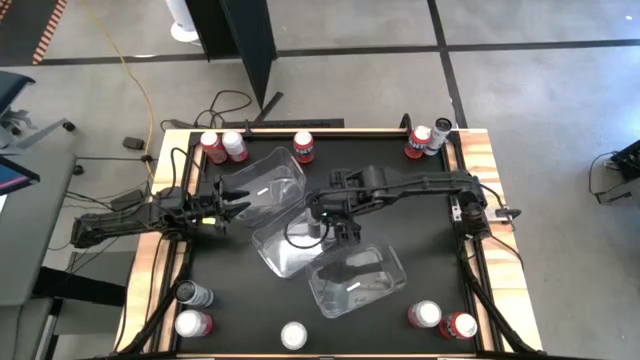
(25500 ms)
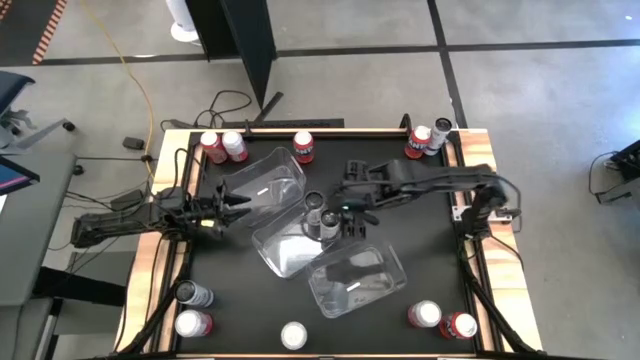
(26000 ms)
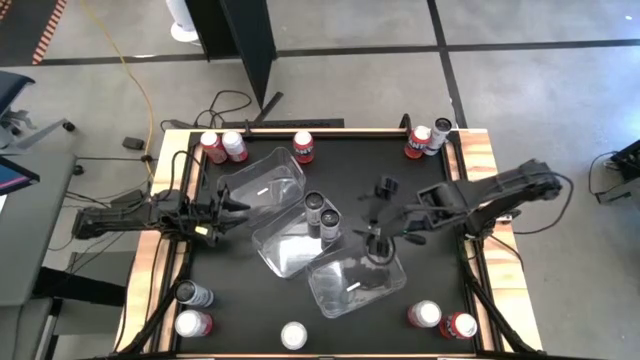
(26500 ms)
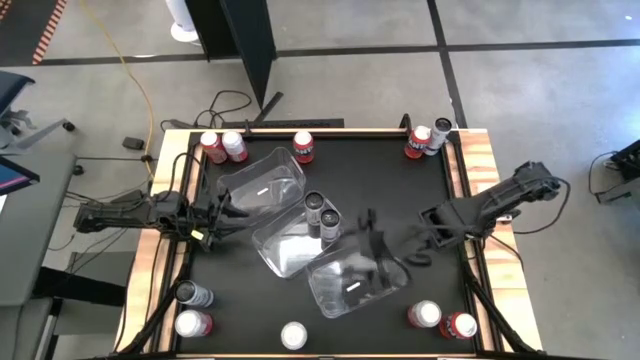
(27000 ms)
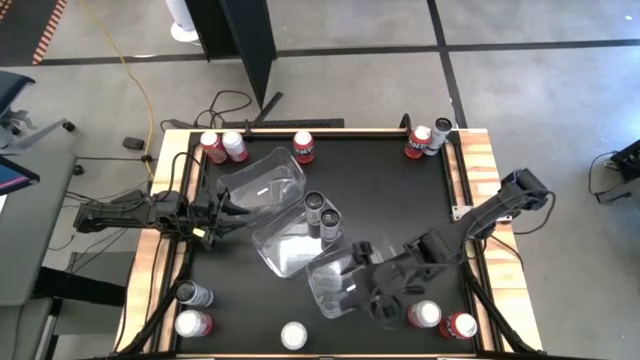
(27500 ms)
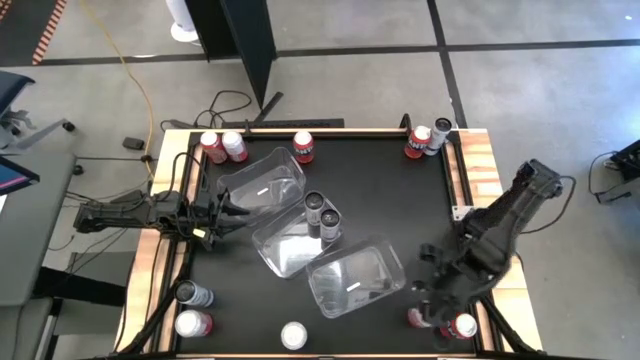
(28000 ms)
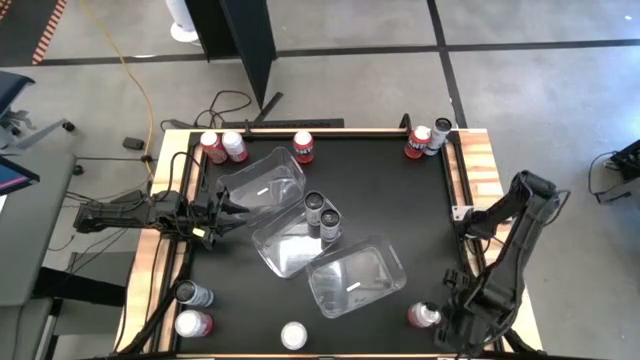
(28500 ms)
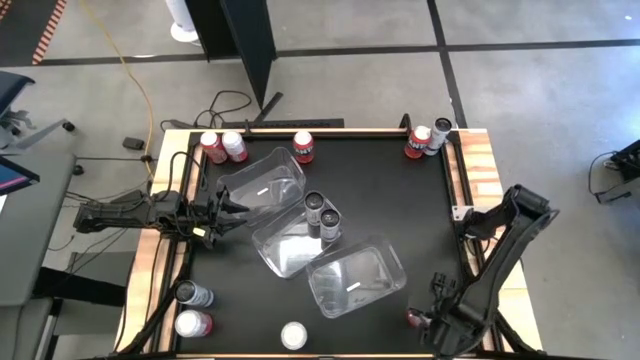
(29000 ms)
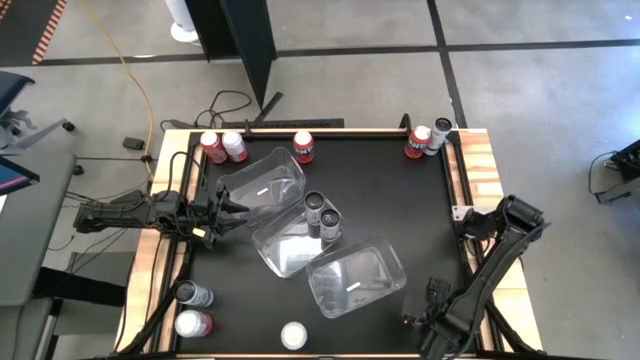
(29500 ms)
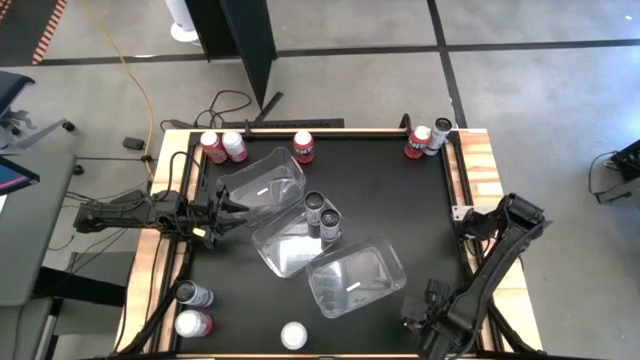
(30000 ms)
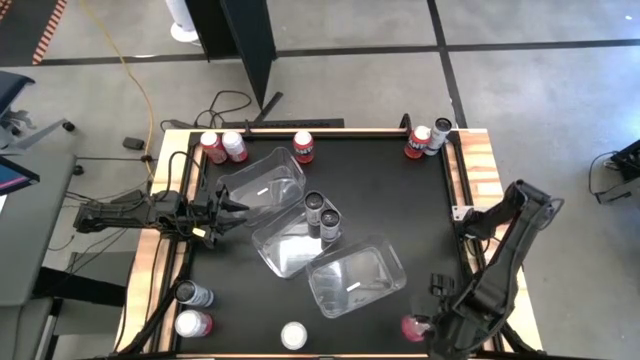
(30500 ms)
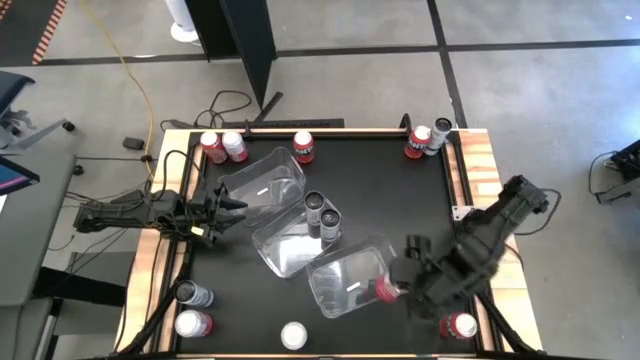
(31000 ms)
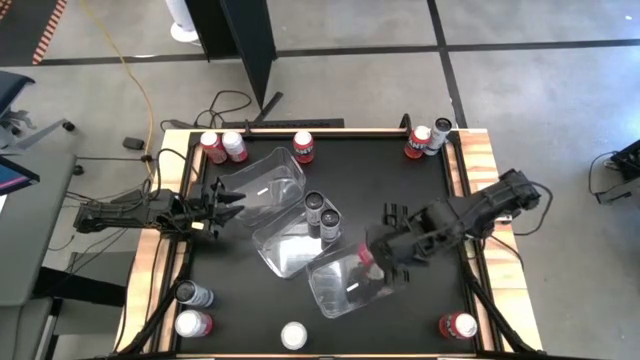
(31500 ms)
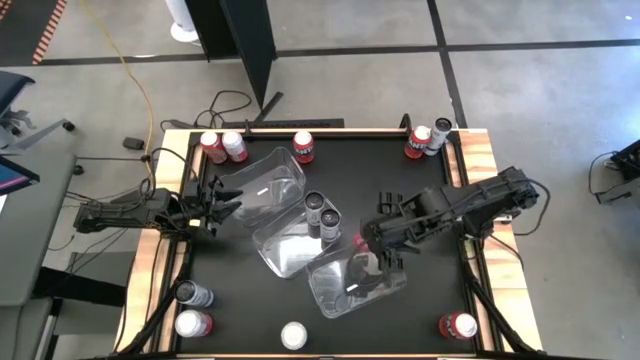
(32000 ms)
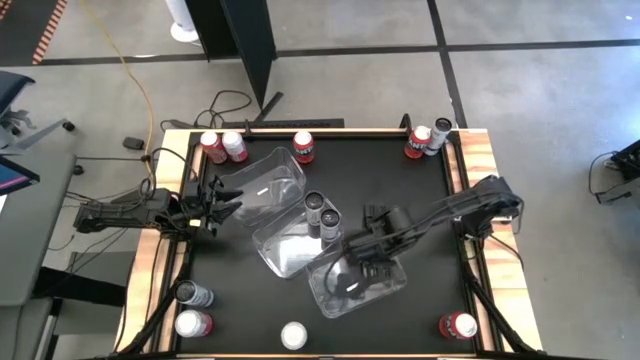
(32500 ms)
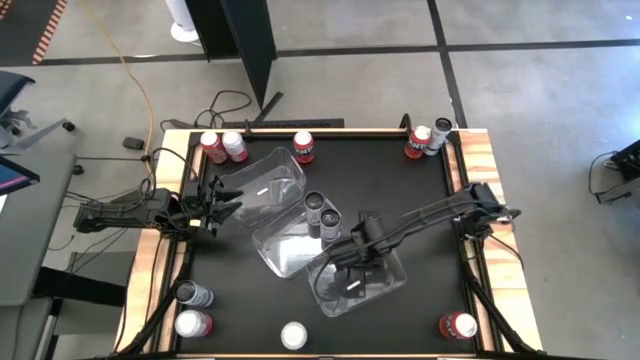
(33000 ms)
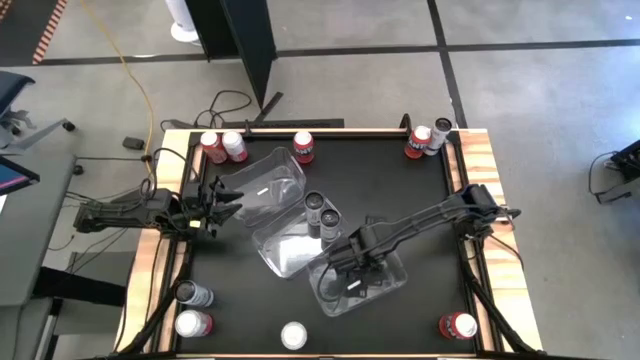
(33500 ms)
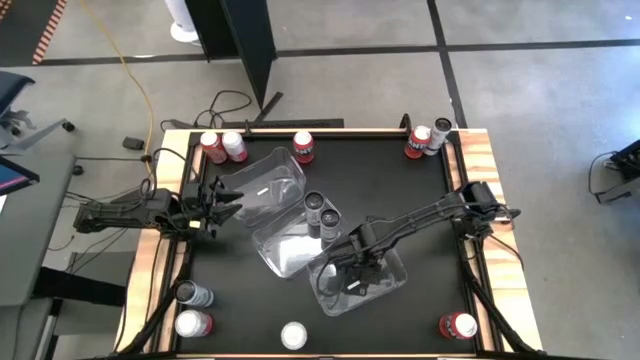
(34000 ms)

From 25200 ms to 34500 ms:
Task: Sort soda cans
Put the bottom right pink soda can in the bottom transparent bin

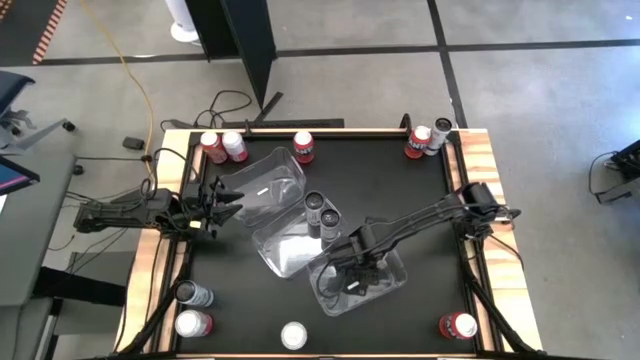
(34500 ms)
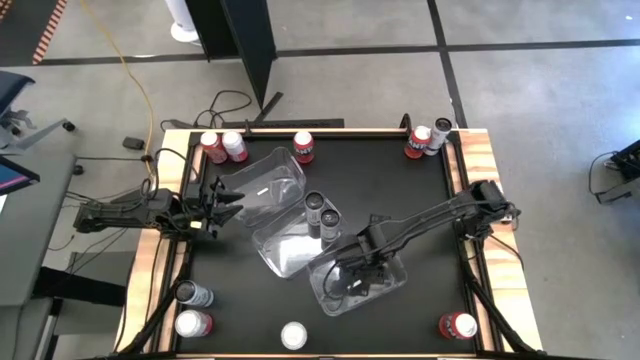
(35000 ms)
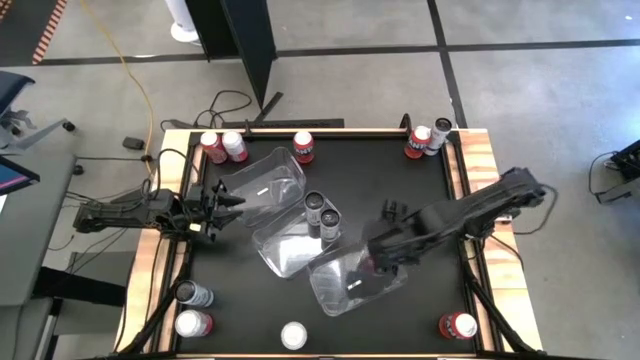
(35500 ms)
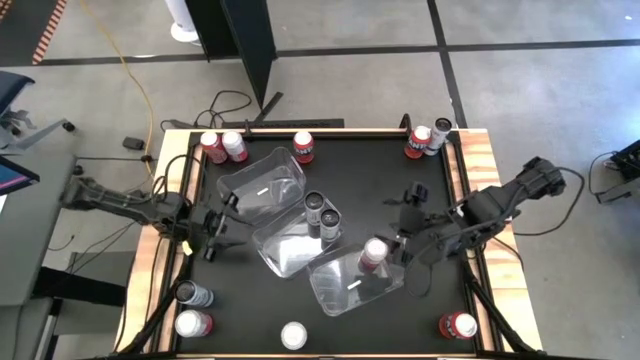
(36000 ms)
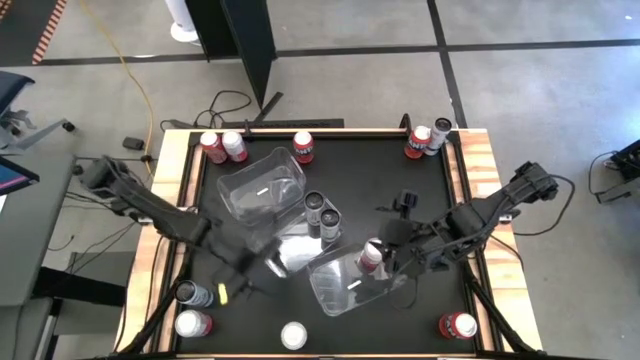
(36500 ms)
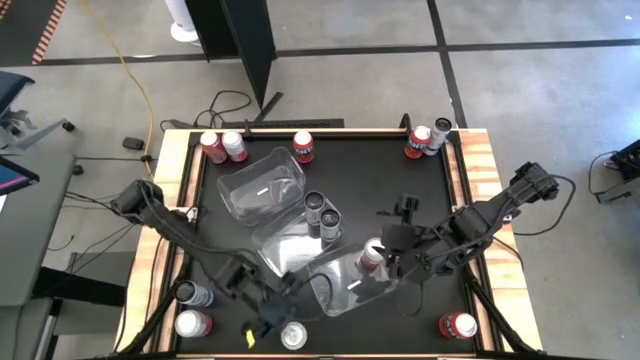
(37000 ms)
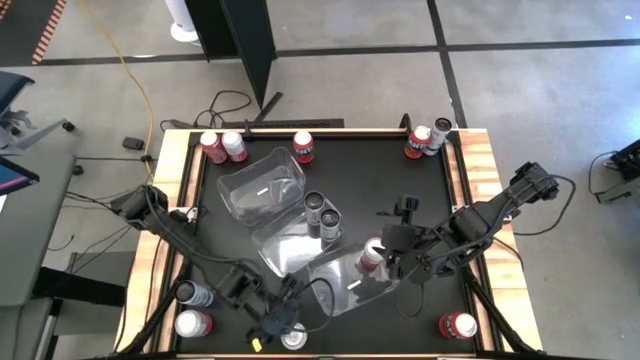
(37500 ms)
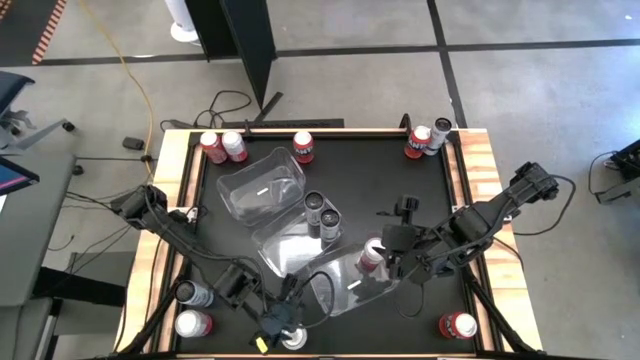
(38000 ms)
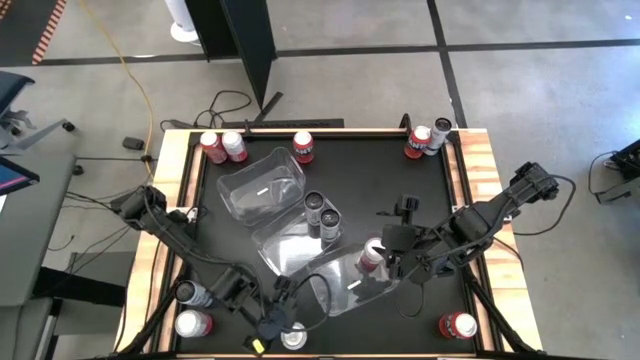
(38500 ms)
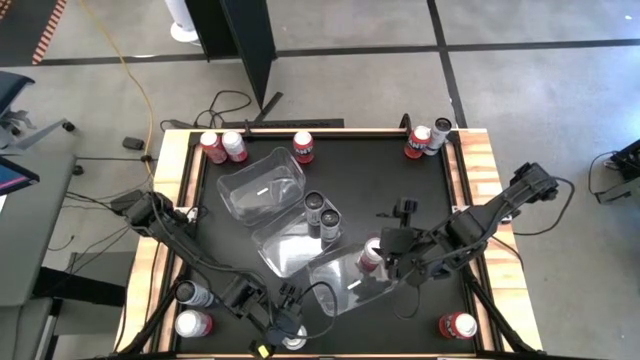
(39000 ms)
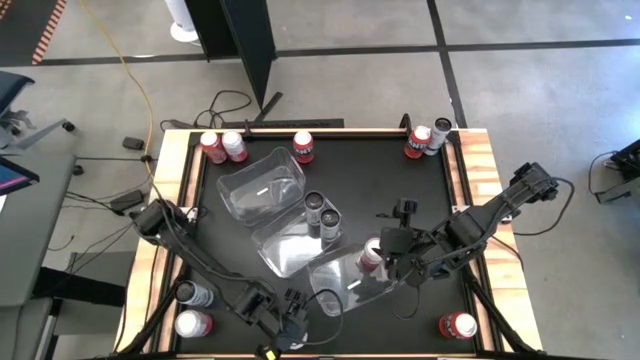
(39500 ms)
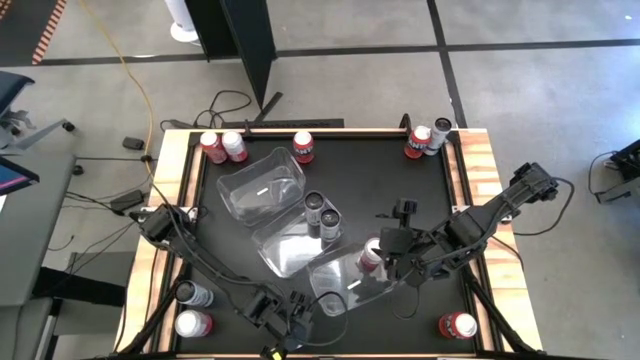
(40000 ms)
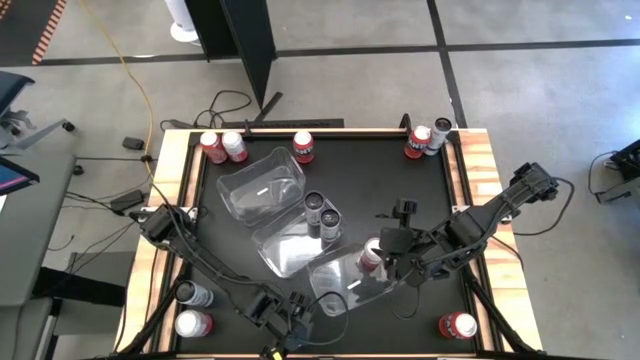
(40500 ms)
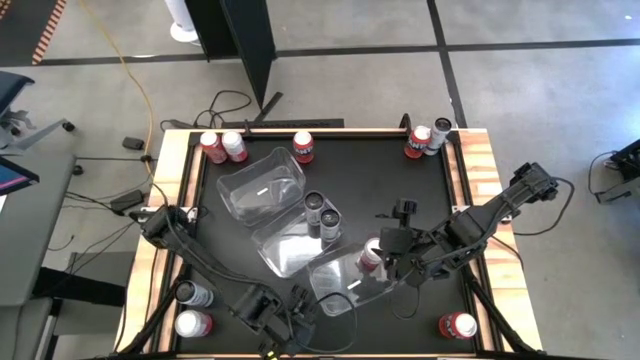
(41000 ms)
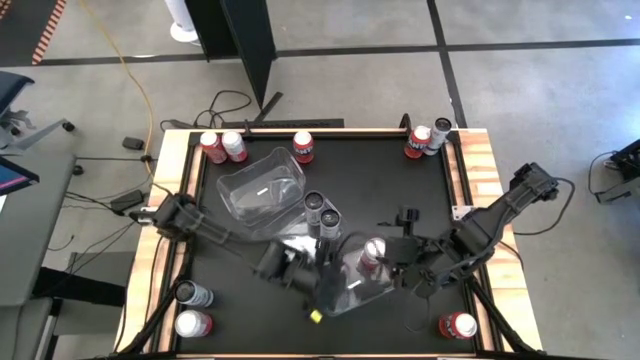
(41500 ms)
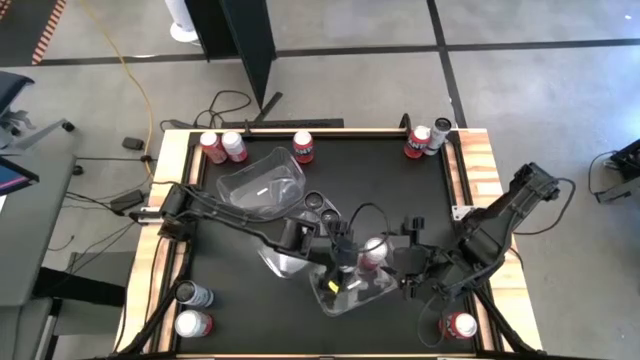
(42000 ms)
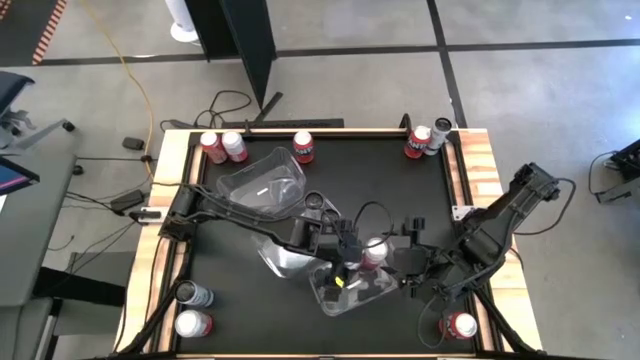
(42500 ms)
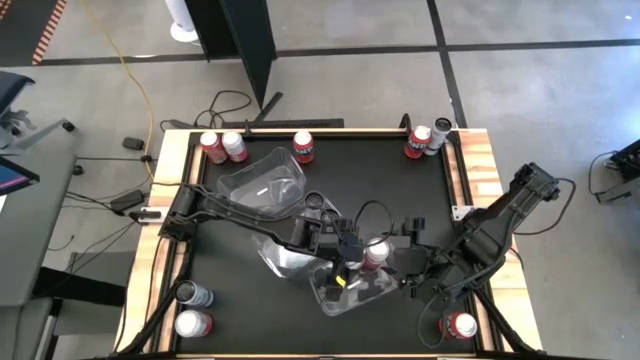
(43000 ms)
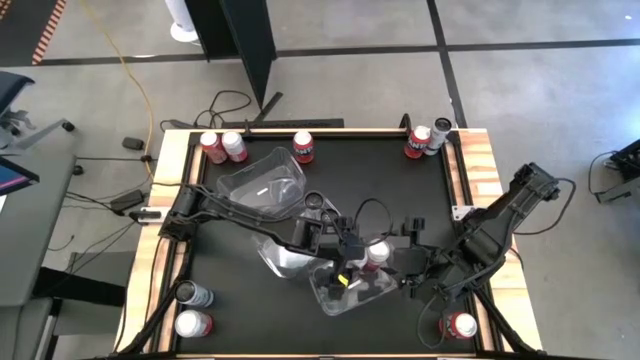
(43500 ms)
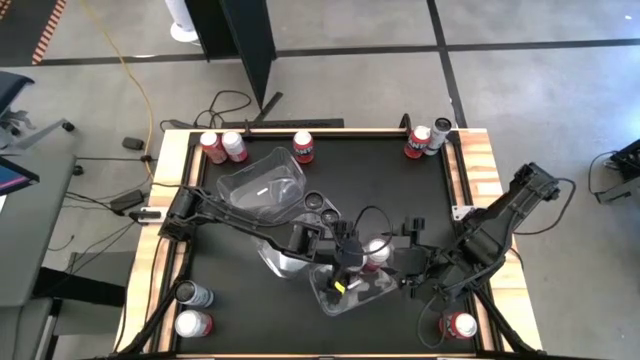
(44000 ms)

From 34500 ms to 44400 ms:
Put the bottom right pink soda can in the bottom transparent bin

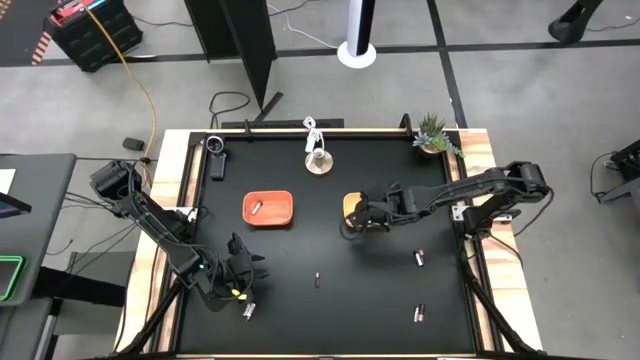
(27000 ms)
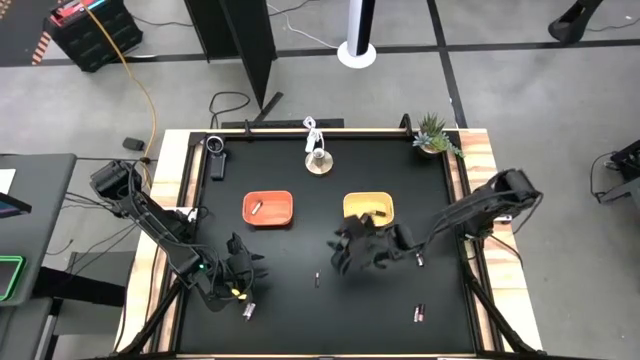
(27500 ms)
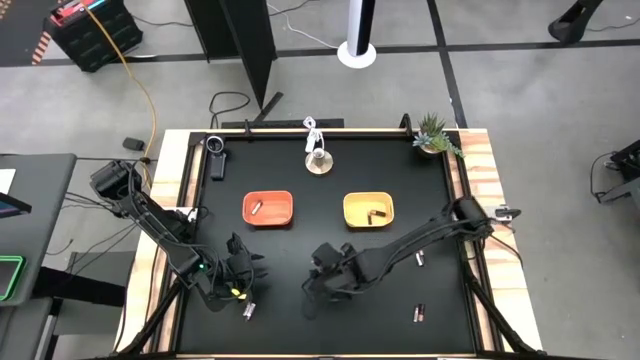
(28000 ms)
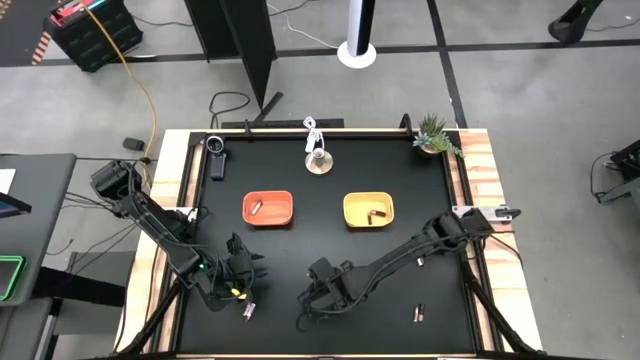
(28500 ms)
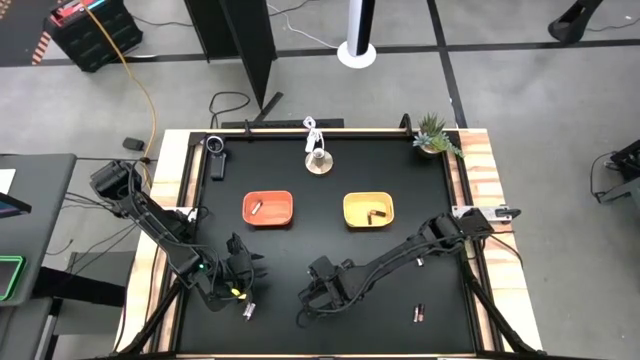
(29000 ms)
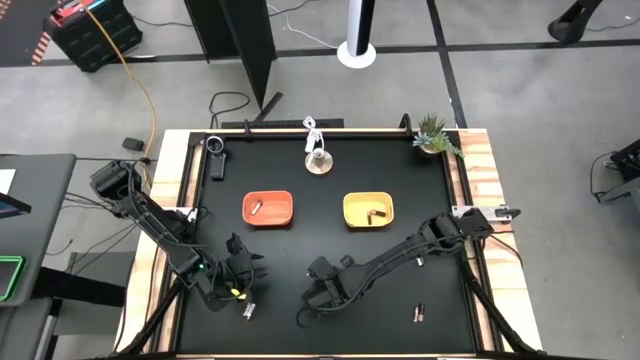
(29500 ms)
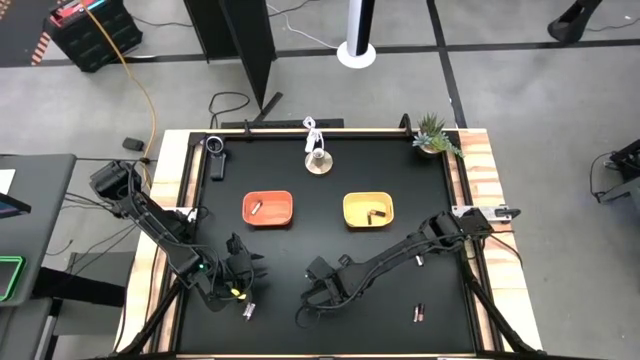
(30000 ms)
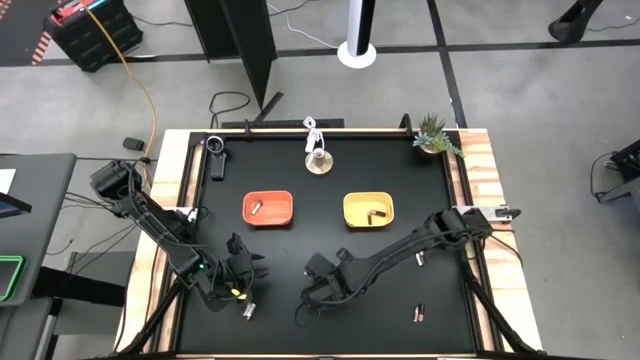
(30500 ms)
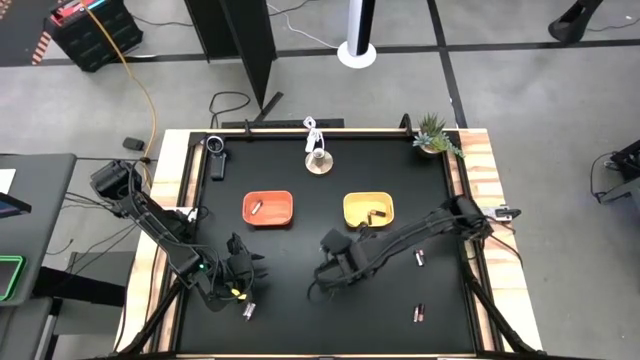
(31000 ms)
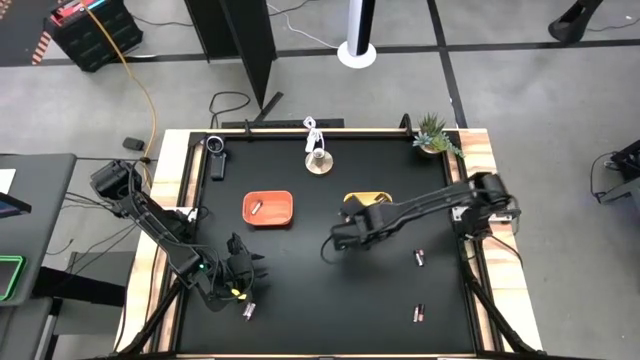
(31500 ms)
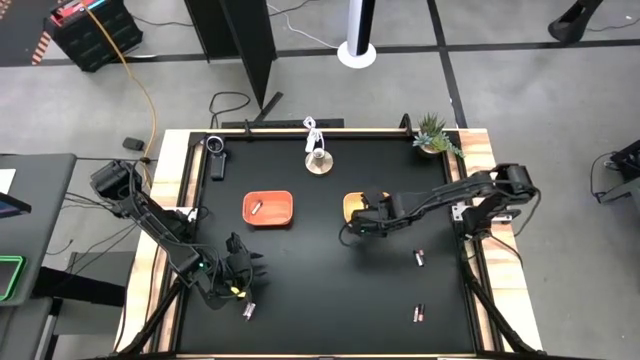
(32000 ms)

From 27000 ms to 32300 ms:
Task: Sort batteries
Put the black battery into the yellow bin
